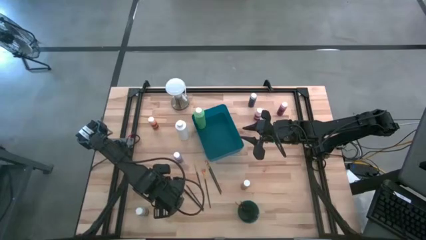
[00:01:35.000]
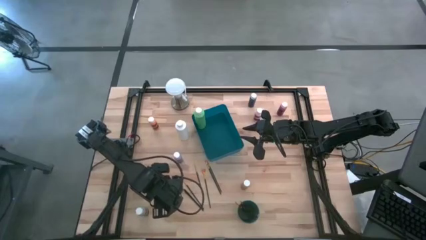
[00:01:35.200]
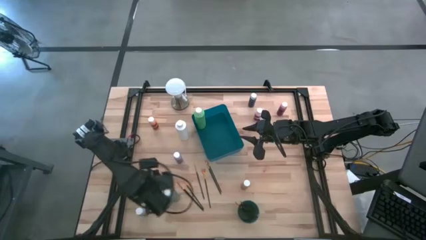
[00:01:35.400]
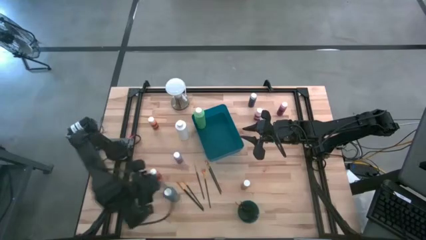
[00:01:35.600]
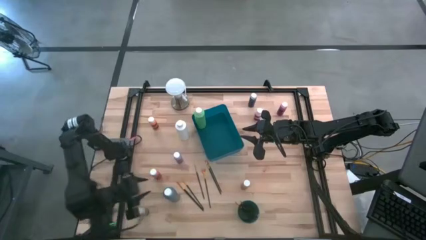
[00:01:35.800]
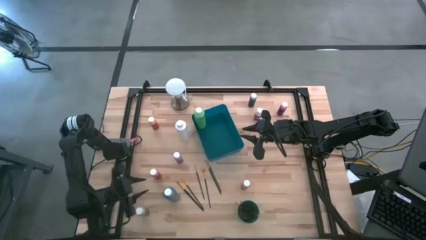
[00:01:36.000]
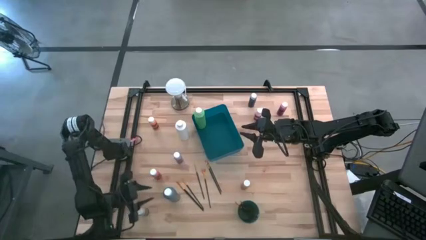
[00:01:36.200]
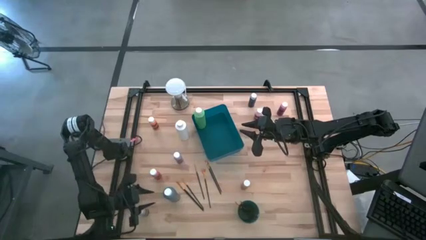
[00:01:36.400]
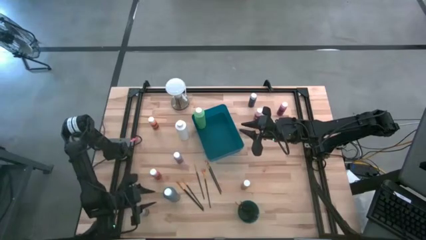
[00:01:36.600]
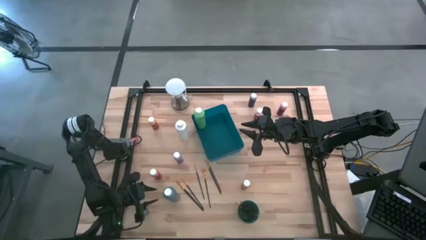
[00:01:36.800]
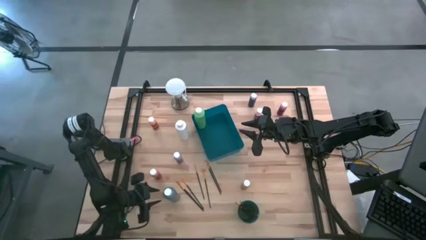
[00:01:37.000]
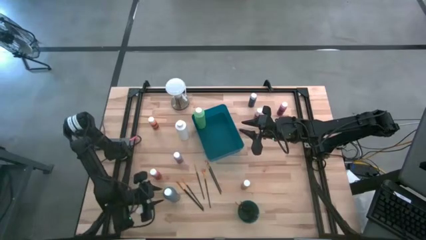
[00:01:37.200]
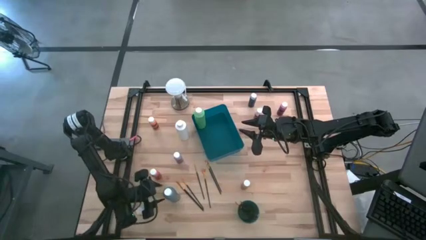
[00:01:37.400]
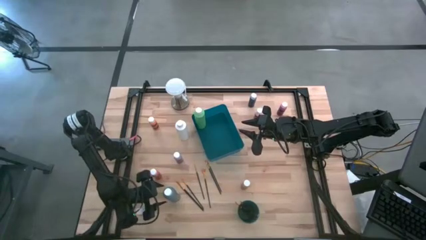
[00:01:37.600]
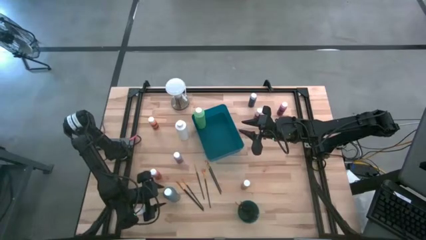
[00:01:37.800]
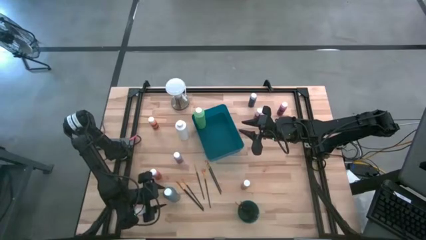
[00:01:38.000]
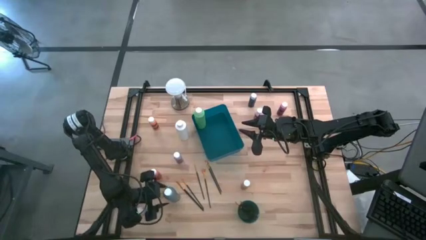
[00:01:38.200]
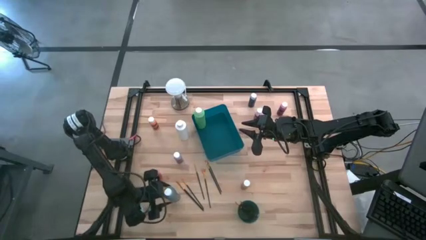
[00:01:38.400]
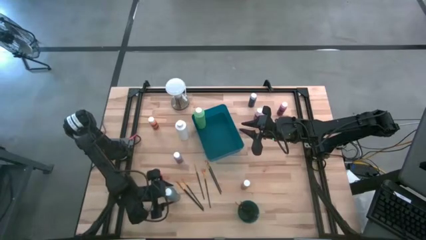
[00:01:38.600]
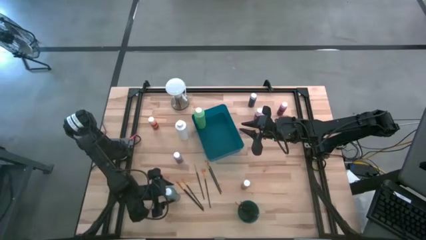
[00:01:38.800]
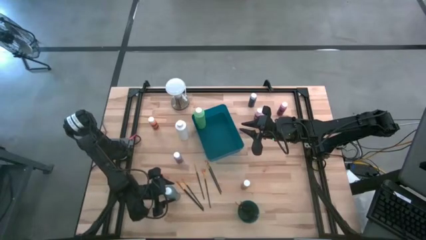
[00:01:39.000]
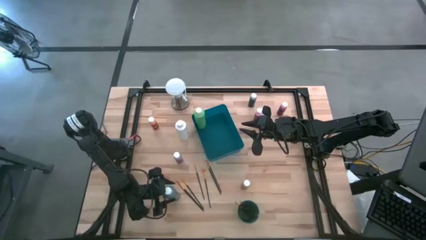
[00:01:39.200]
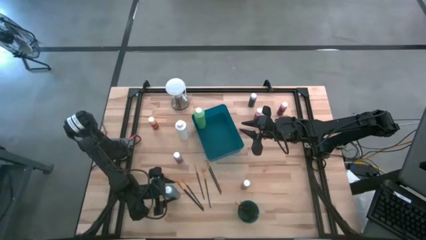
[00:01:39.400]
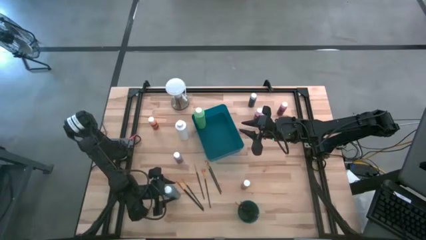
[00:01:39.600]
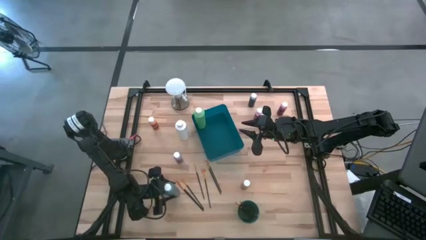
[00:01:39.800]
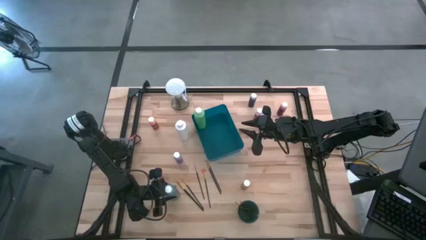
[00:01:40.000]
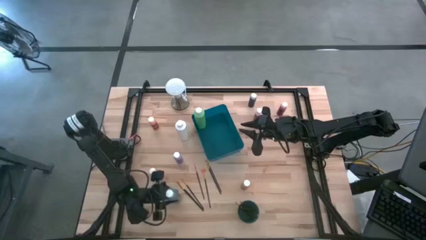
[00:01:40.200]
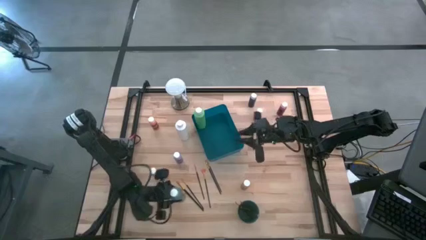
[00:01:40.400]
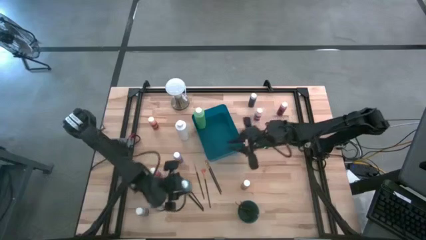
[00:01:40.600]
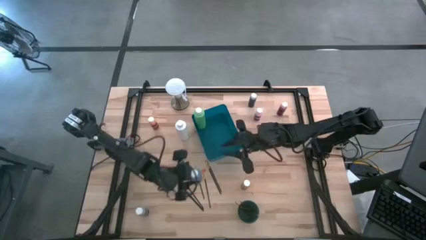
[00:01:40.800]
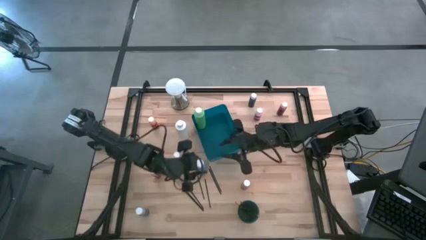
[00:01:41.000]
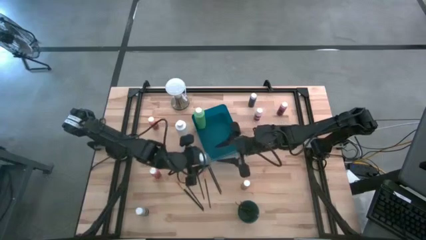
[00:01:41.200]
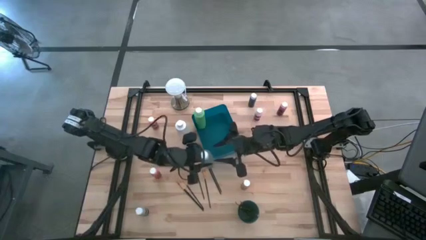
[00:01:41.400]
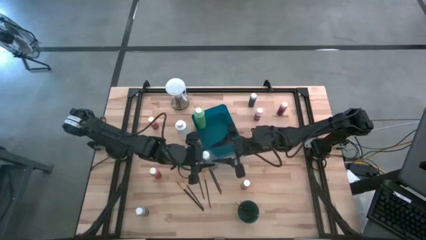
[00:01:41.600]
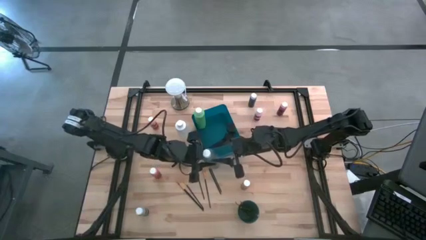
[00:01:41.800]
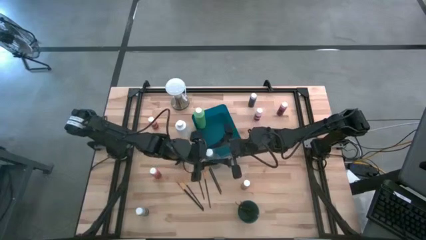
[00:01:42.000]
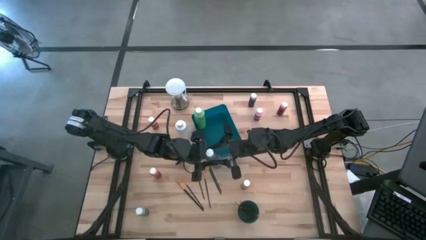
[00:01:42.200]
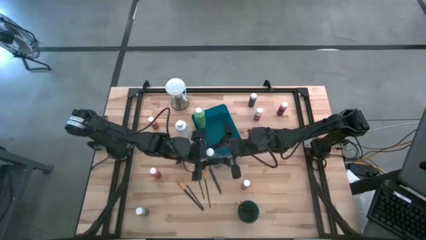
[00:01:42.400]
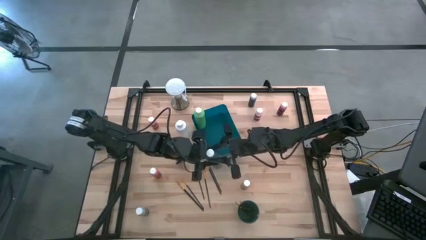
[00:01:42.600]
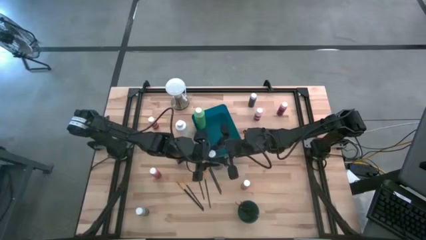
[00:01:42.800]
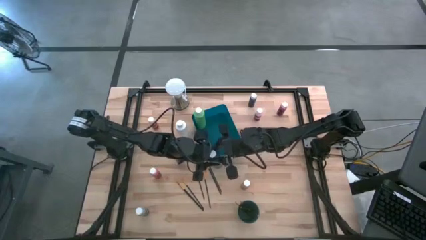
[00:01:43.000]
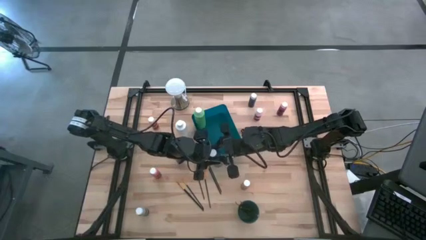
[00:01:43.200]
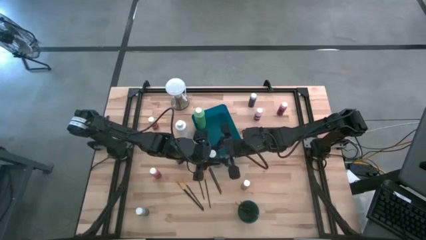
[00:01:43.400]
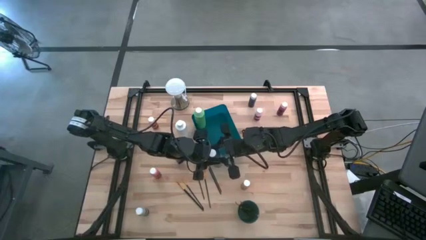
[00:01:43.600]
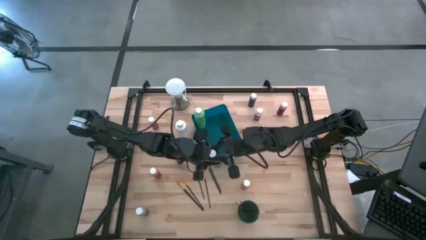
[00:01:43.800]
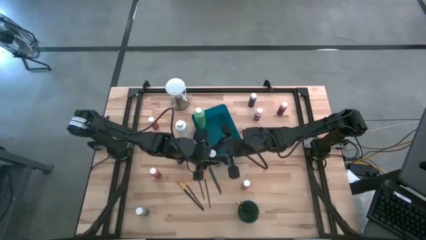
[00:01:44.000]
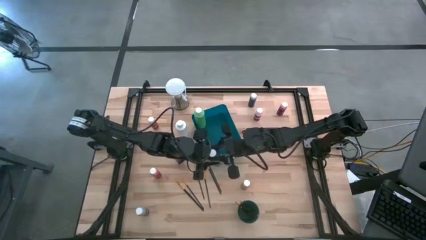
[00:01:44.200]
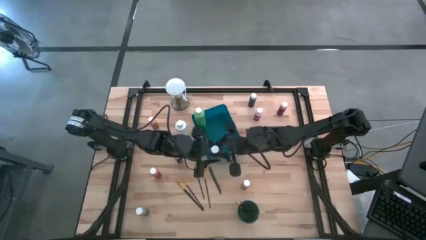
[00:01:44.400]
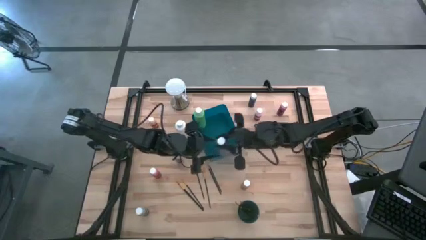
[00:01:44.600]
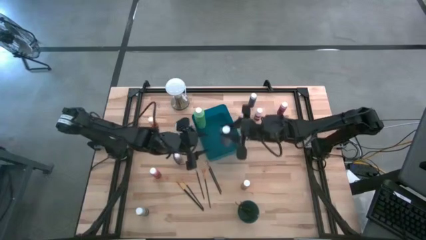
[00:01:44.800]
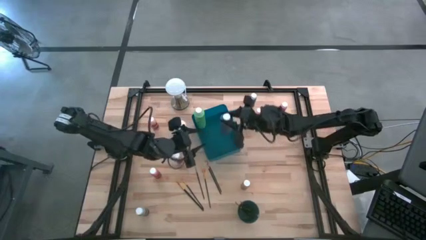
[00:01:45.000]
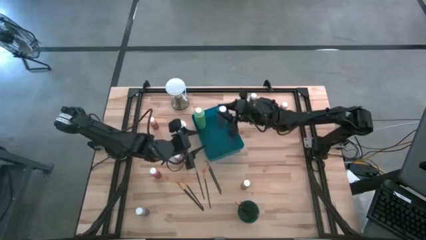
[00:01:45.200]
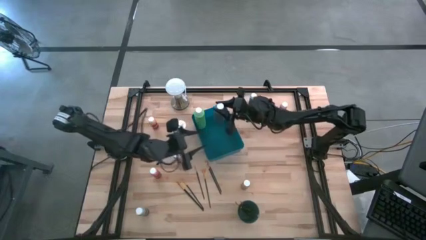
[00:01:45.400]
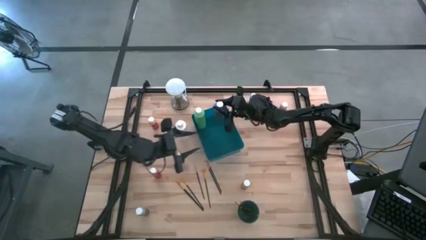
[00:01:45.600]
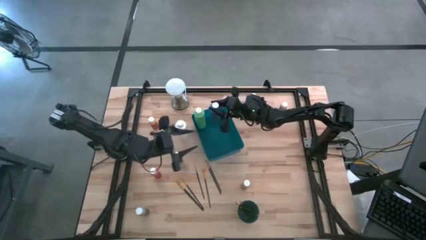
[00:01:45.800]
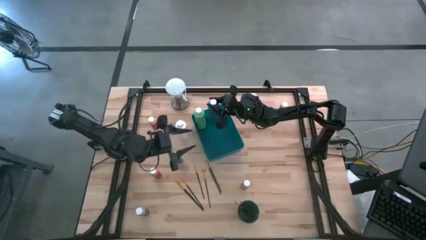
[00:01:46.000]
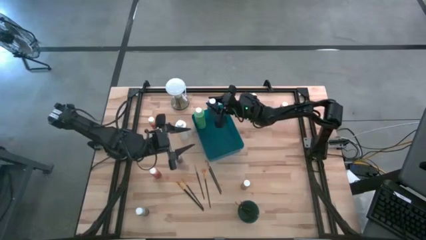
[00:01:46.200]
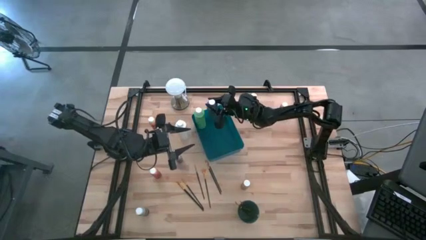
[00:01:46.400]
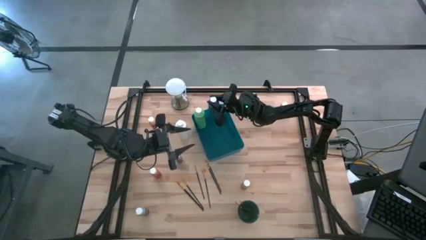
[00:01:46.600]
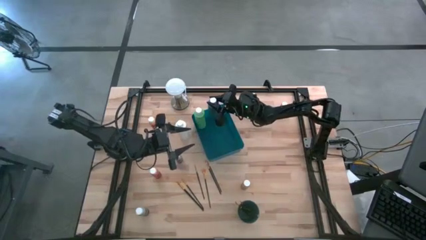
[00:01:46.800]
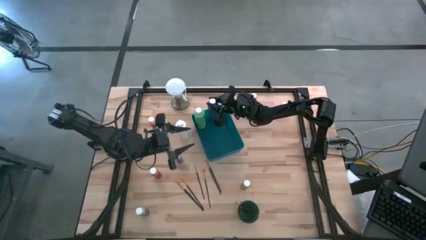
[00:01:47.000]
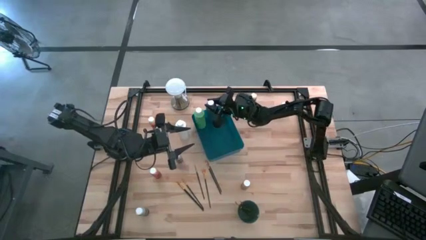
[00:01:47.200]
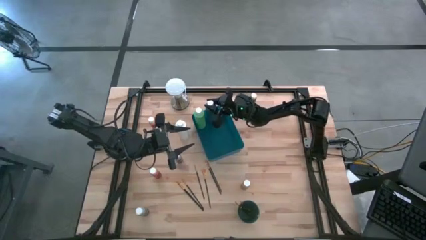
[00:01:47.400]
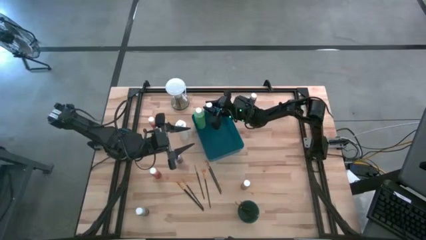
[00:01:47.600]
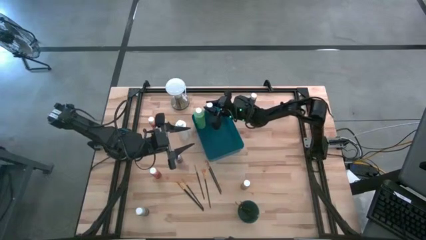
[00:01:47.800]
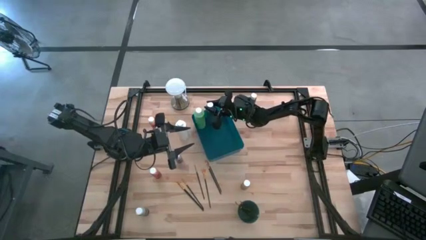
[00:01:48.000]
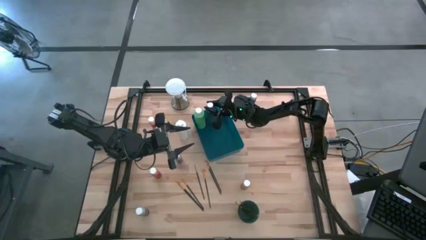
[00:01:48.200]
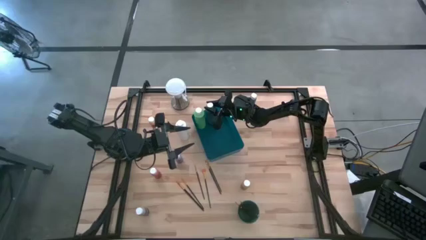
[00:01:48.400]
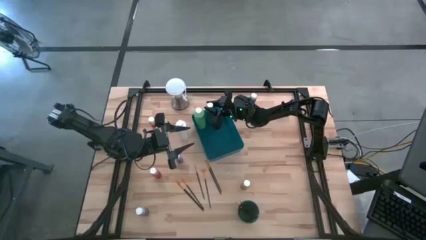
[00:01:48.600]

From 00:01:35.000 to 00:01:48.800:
Task: Pick & Place Paint Supplies
Put the blue paint bottle into the blue bin
